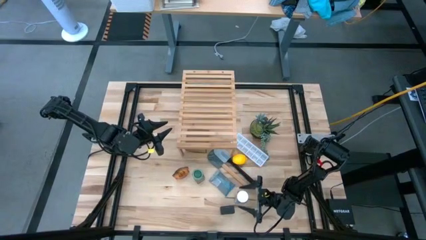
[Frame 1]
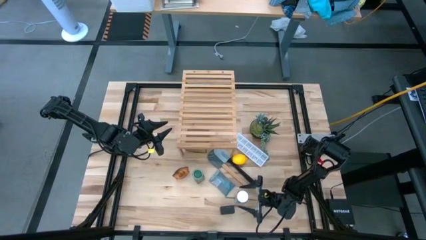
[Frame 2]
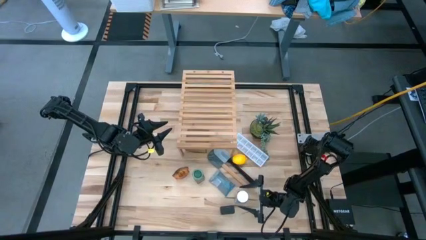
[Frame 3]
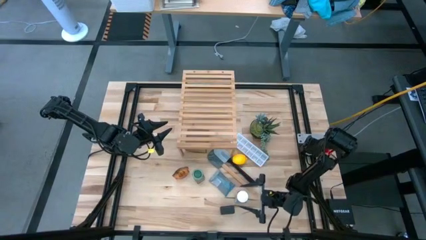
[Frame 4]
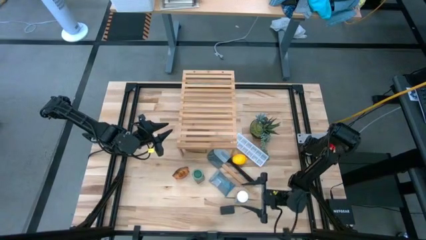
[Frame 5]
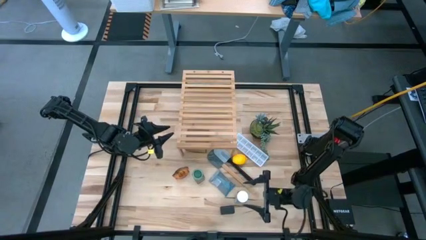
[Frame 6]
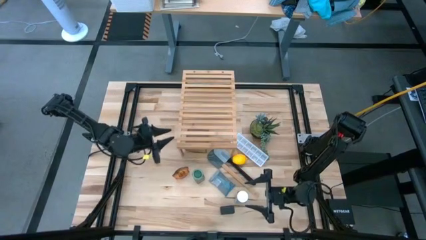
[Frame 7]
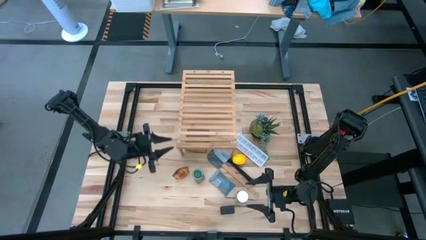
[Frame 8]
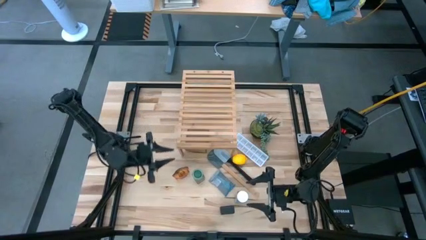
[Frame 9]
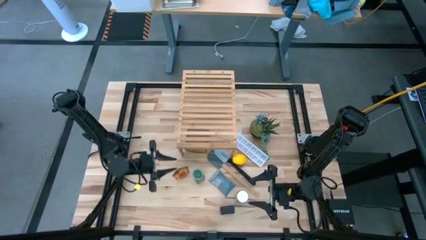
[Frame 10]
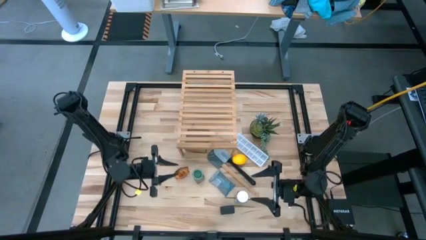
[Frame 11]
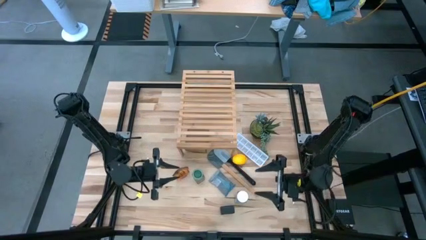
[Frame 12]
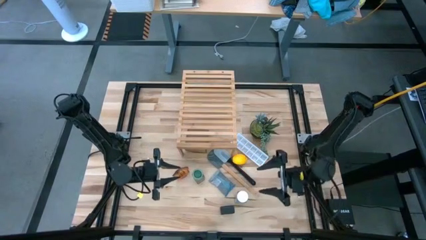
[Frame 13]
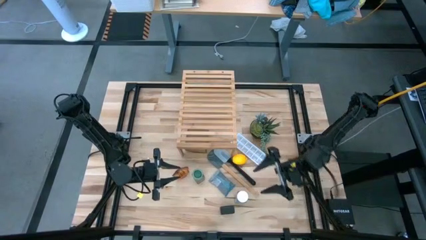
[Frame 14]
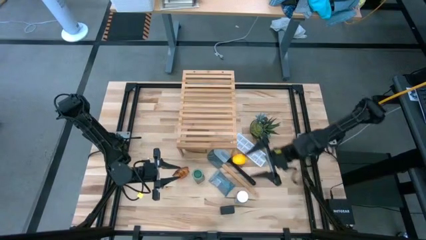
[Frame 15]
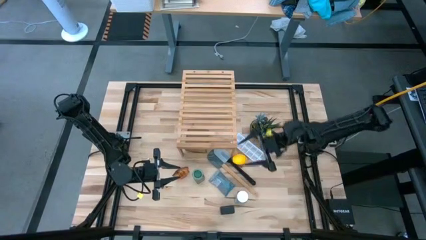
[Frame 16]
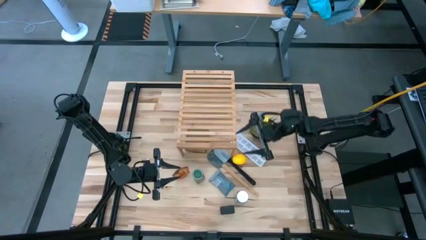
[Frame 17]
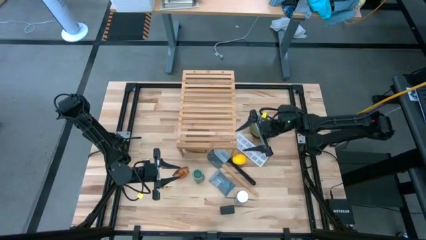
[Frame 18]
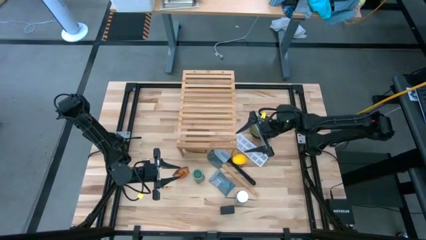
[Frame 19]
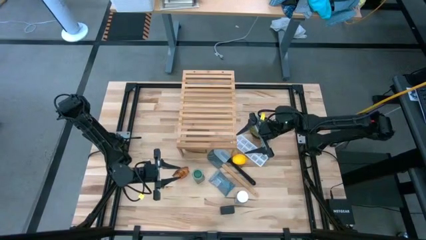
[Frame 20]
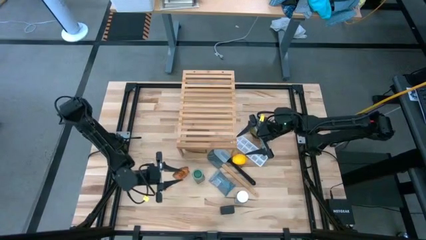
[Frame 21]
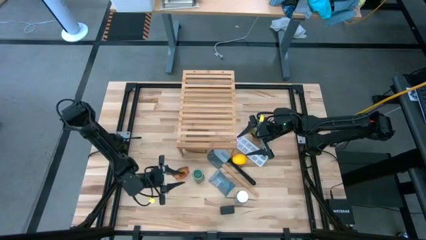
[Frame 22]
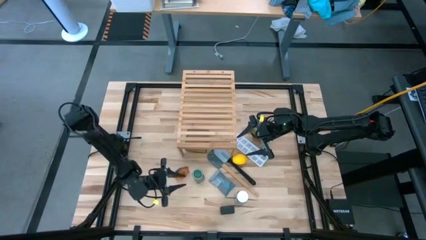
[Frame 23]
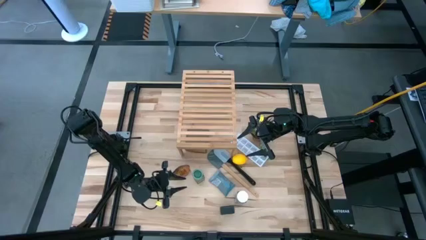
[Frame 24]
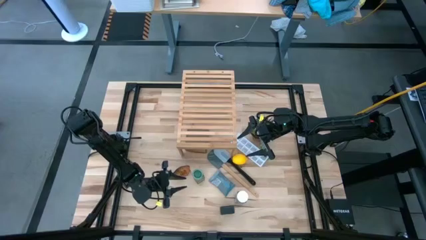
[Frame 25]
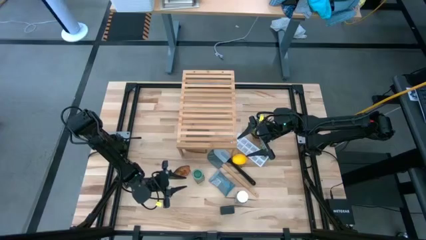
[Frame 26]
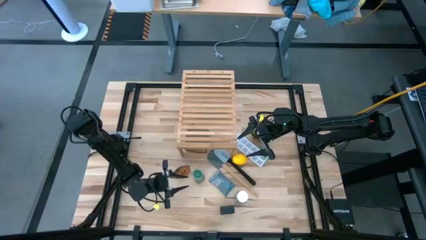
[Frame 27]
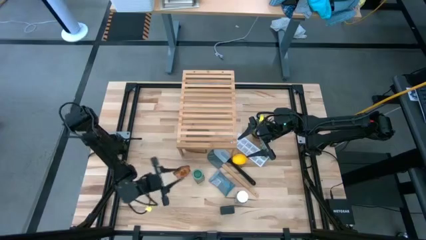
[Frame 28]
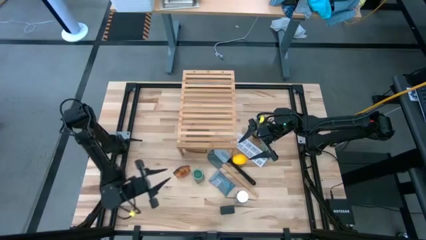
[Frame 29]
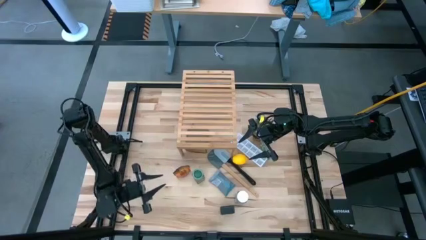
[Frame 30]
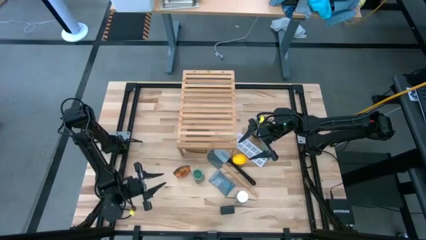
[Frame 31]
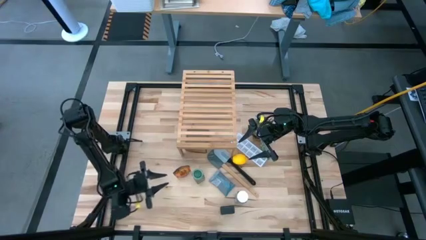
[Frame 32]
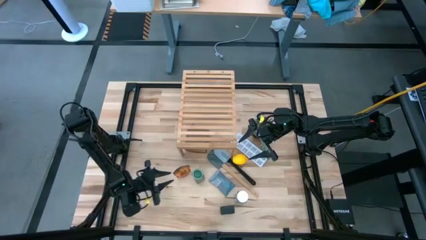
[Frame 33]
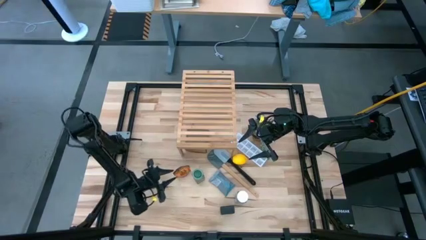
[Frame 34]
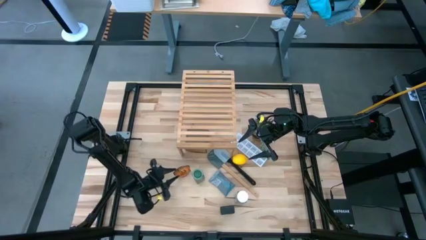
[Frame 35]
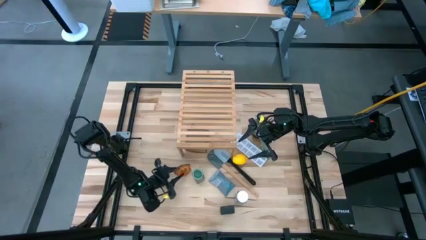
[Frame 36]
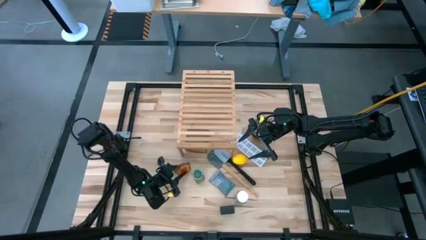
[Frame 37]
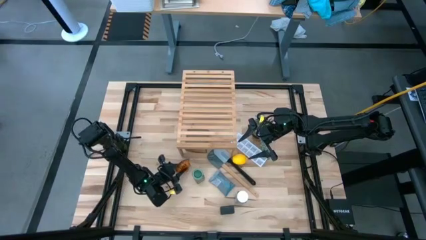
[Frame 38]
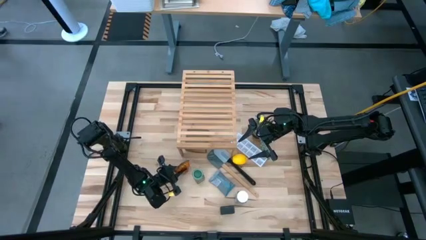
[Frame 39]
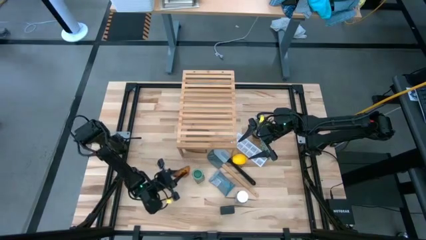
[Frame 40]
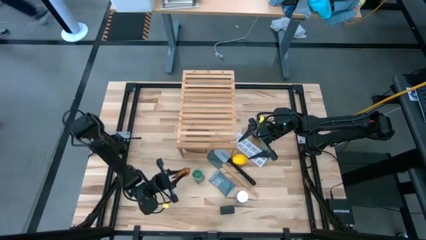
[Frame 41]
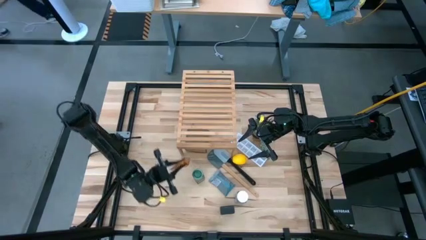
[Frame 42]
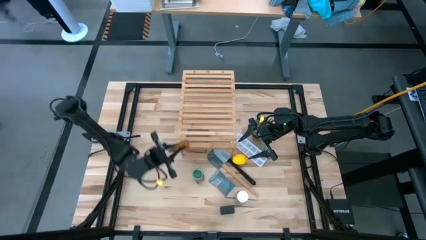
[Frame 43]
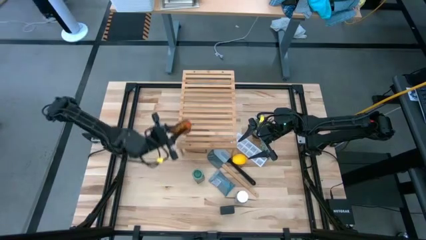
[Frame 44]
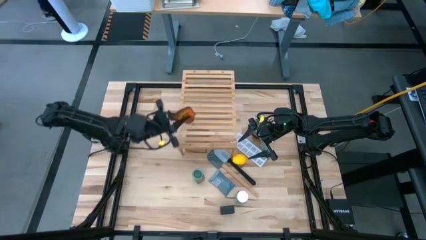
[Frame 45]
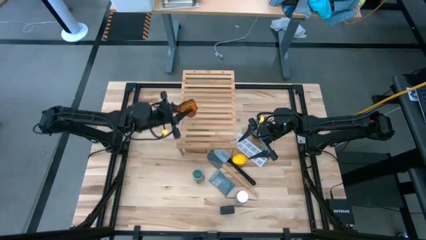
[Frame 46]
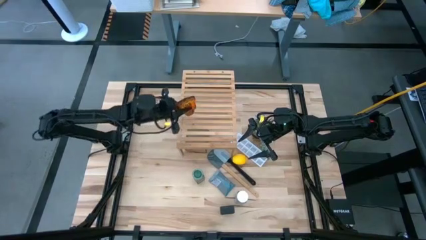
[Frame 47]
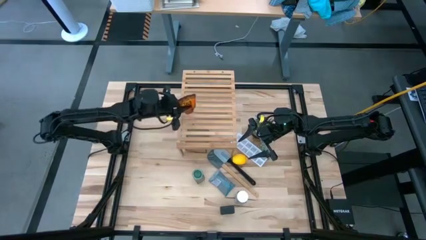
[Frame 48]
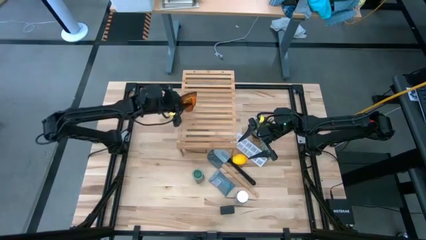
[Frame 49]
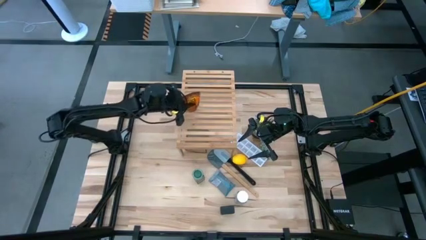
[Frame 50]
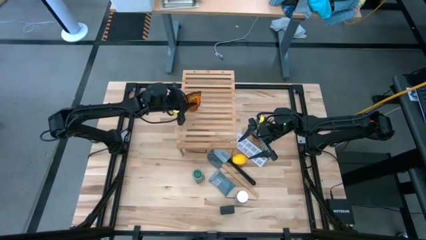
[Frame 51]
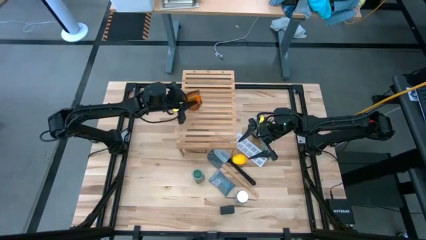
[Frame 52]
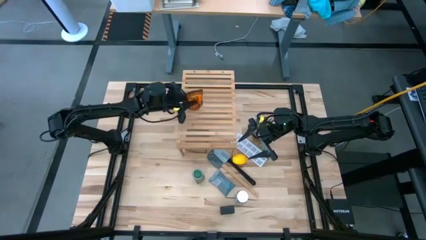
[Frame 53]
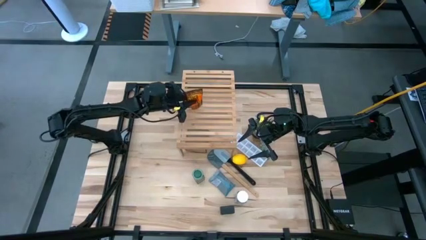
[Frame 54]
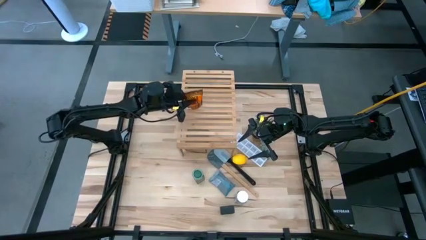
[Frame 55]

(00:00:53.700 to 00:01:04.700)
Task: Shelf spices
Put the brown and orange seasoning bag on the shelf

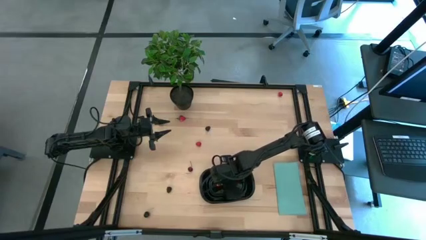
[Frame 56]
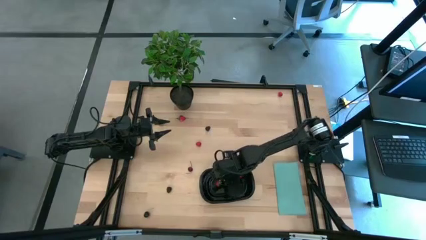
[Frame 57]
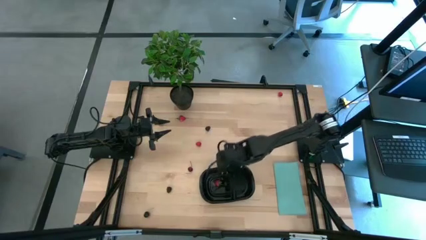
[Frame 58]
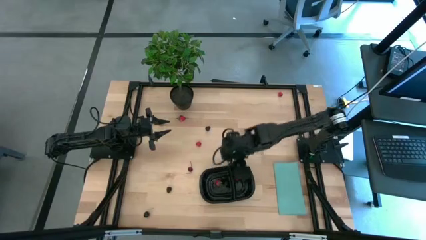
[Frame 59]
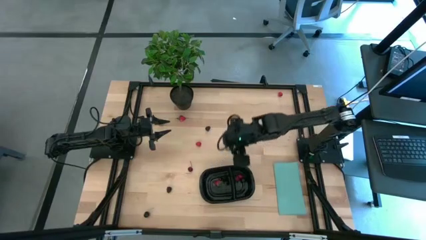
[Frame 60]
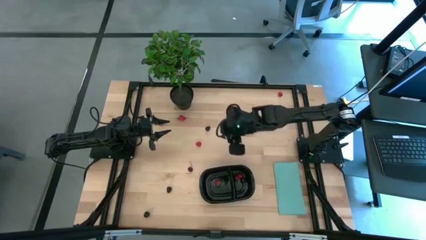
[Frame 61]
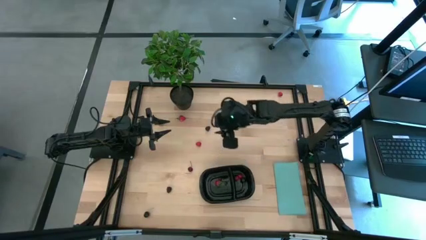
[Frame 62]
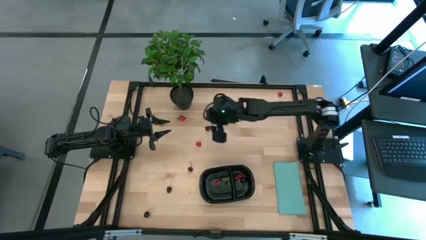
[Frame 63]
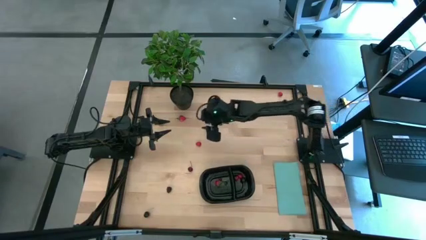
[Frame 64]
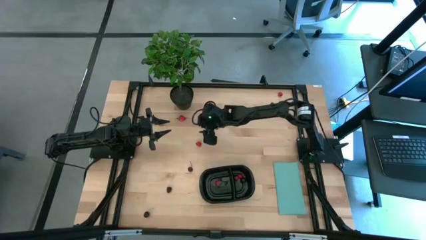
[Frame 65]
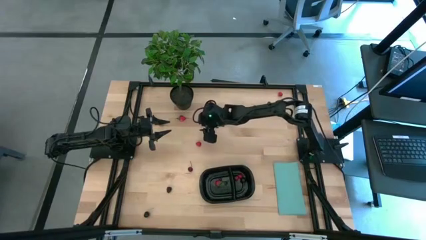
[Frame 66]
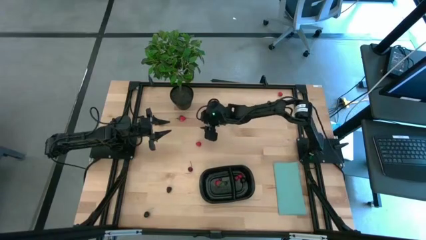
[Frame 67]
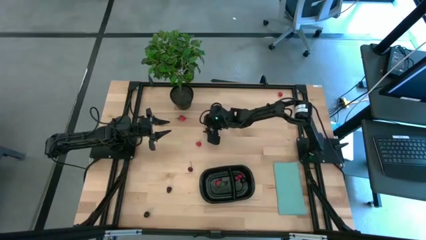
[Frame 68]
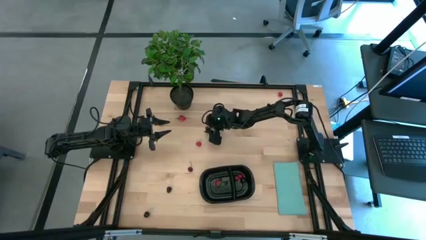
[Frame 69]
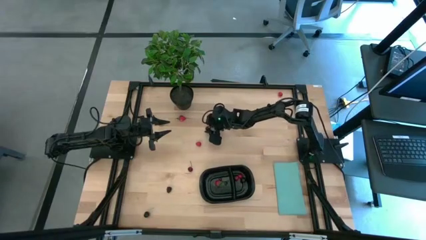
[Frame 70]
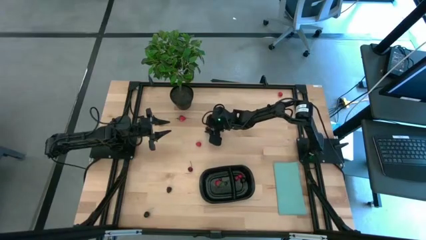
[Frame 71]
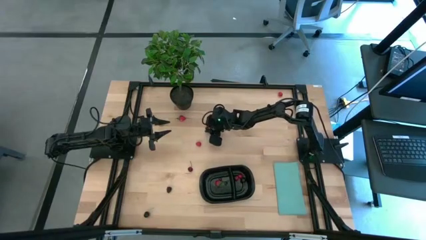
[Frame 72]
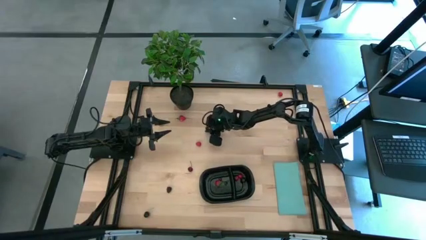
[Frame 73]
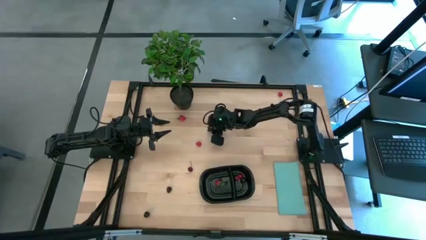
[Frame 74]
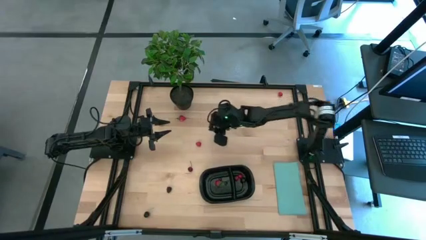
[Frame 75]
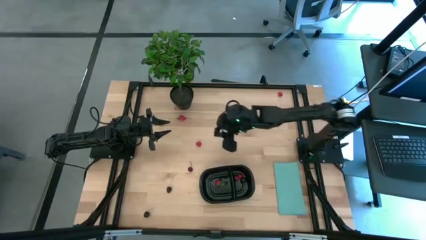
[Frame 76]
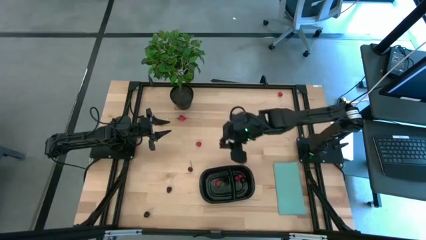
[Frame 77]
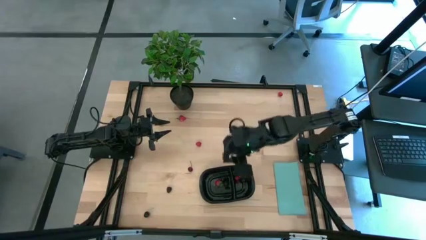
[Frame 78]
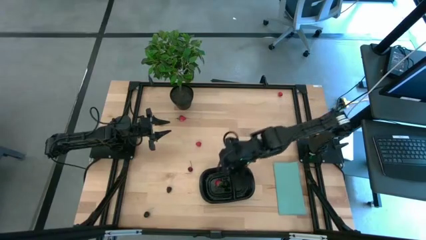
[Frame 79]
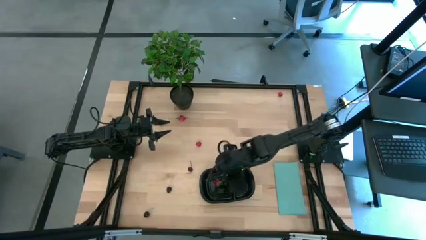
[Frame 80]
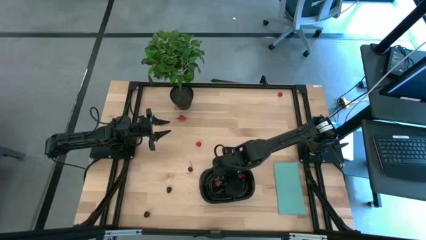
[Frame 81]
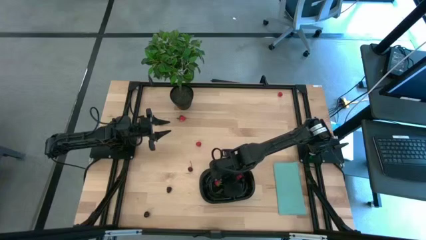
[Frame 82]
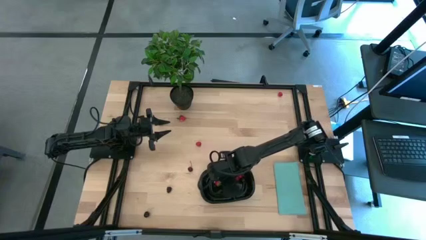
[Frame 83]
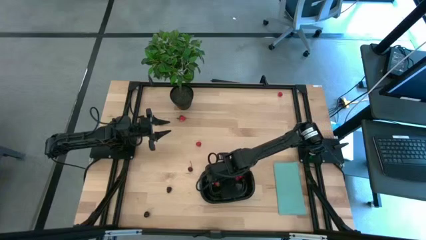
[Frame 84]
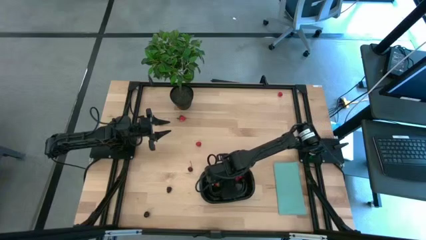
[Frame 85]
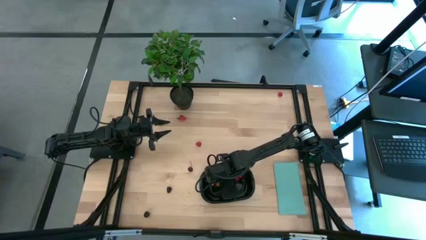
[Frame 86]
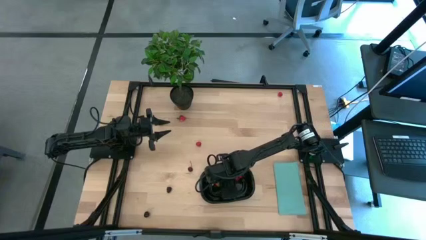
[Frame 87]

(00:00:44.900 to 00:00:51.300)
Task: Pick and placing Produce into tupperware
Put the top blackberry into the left side of the black container
